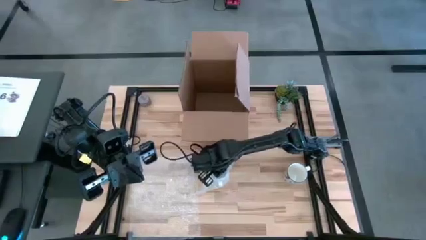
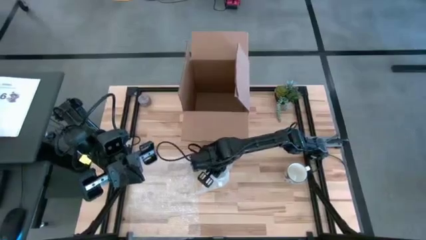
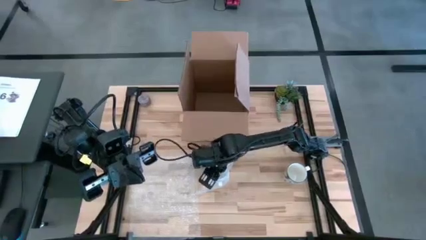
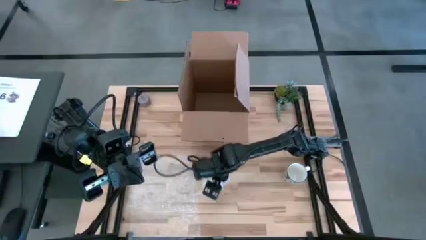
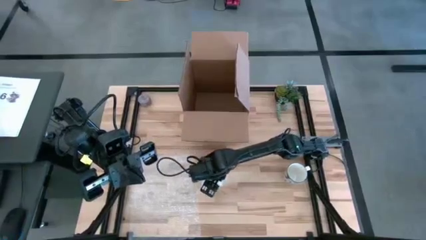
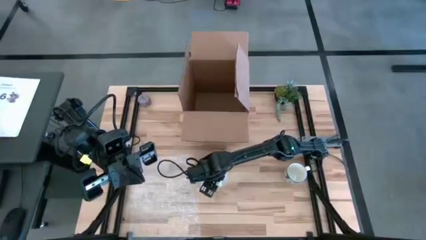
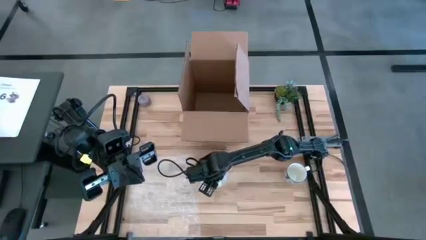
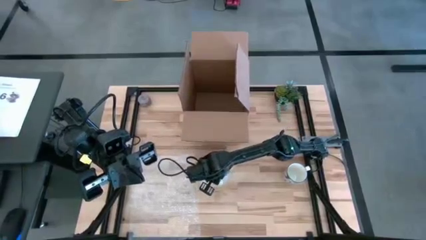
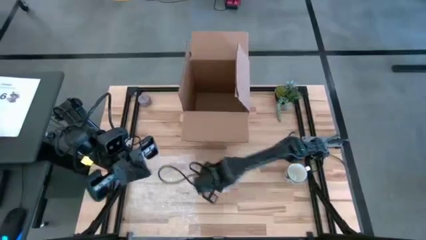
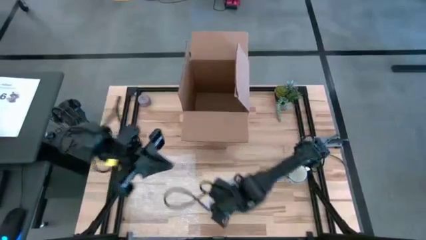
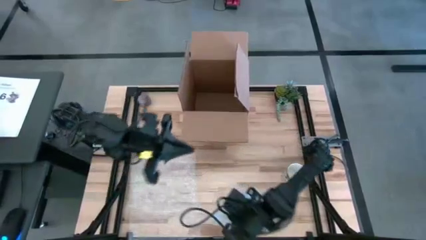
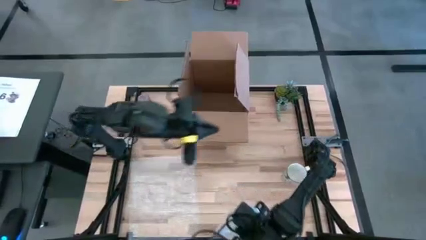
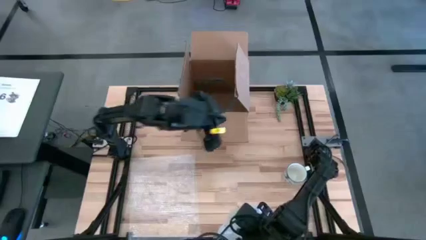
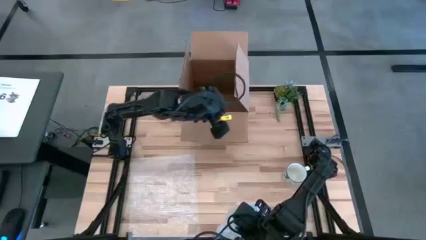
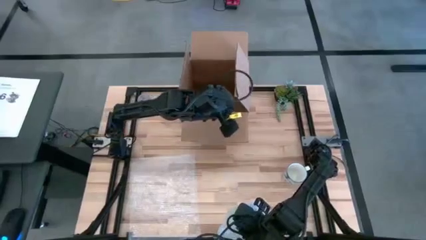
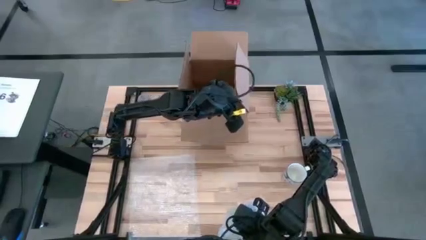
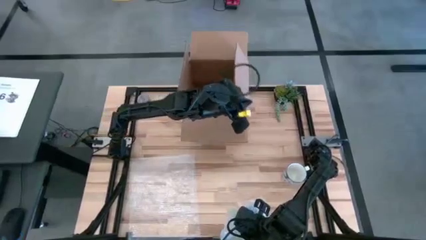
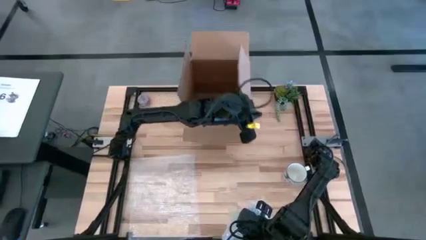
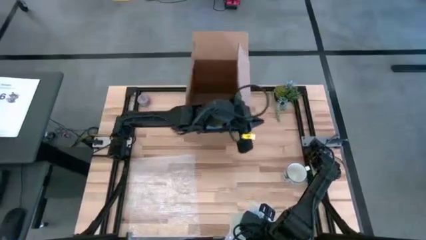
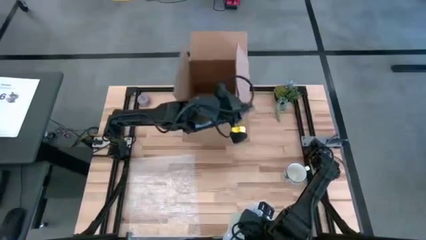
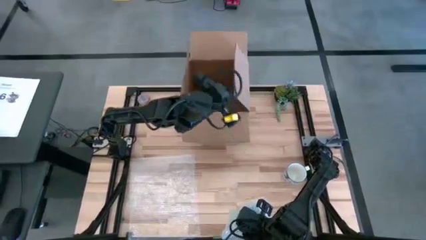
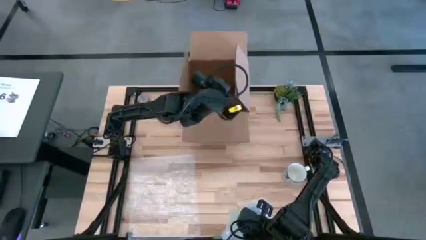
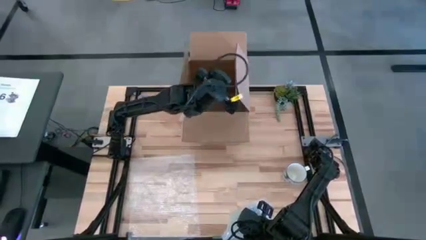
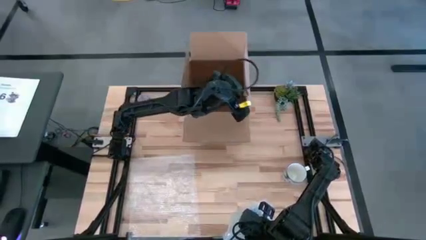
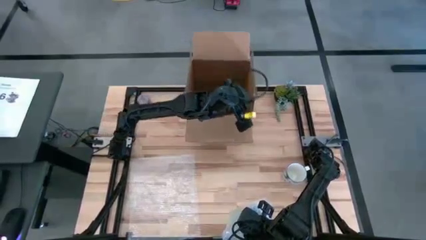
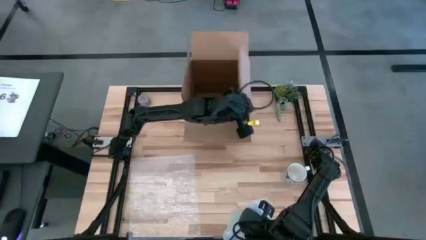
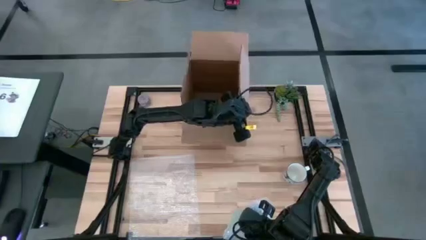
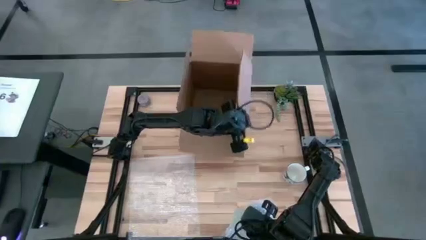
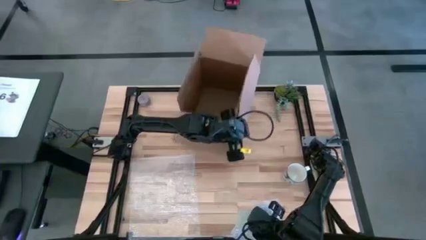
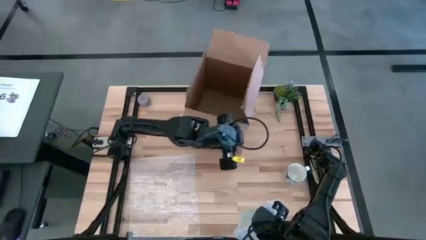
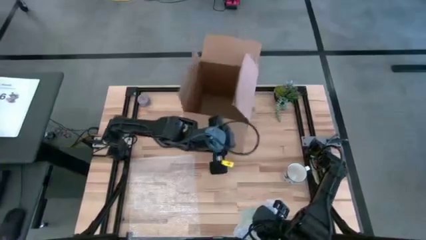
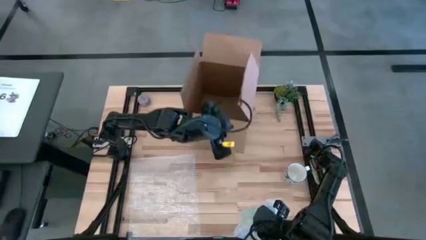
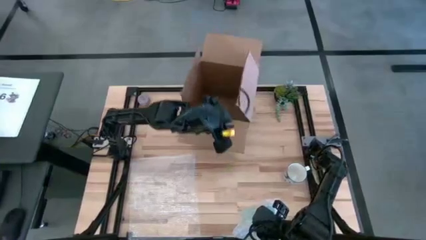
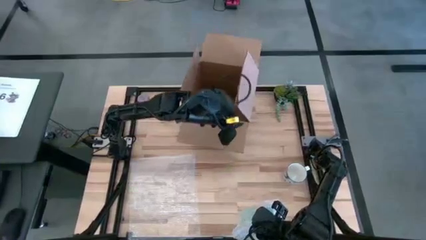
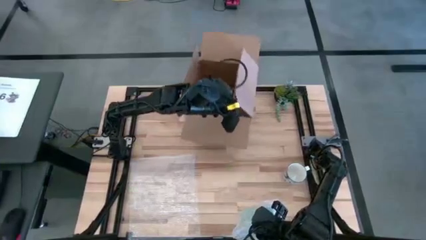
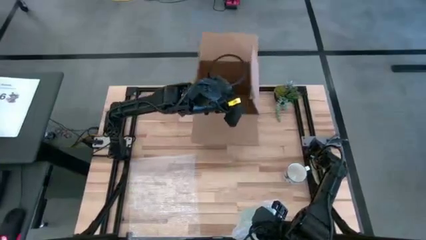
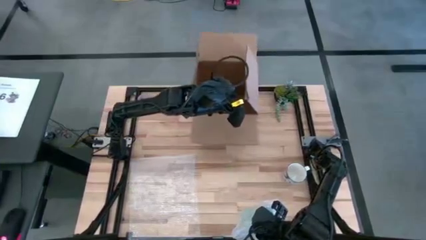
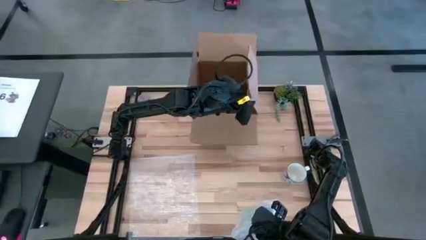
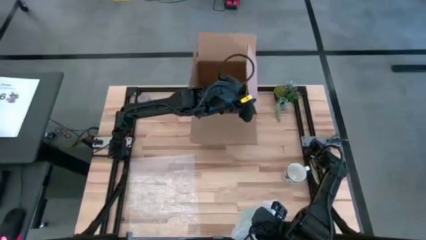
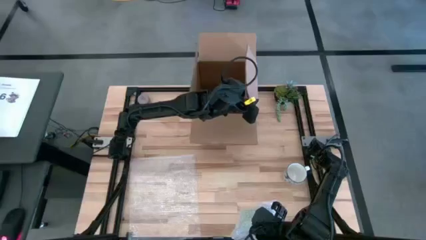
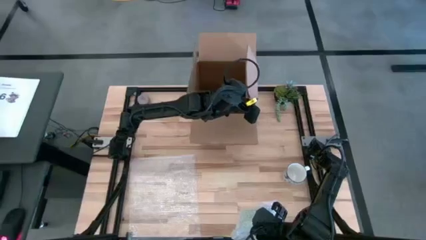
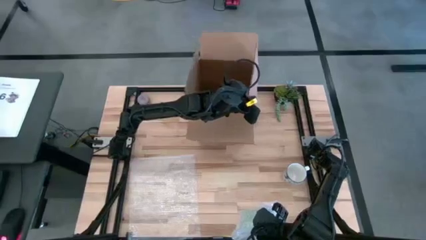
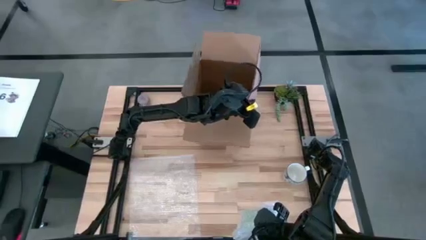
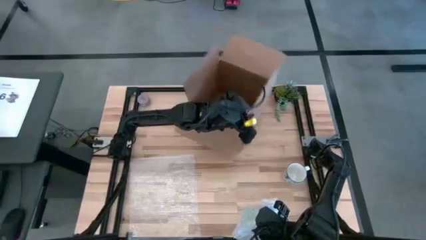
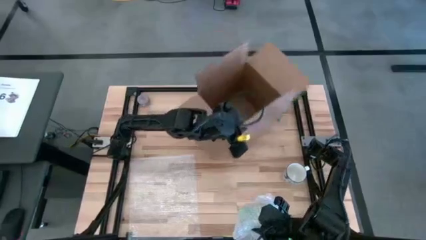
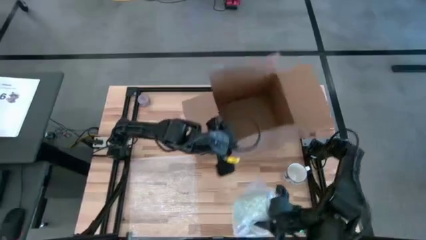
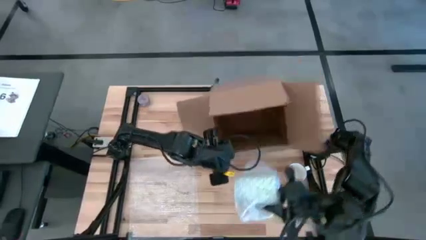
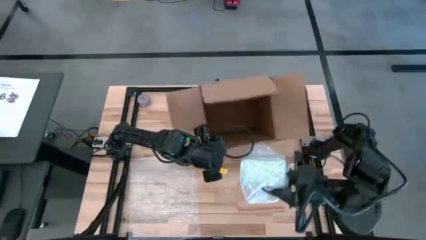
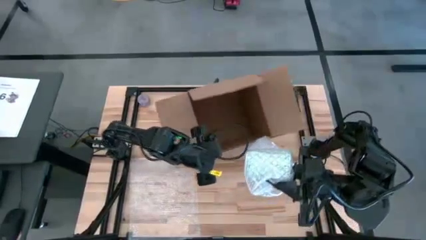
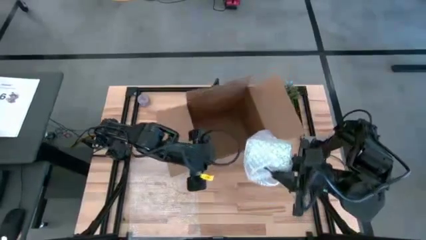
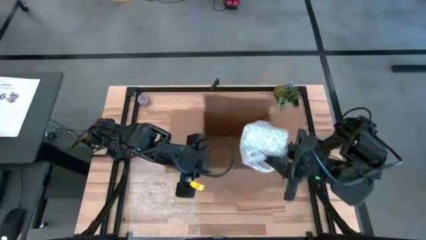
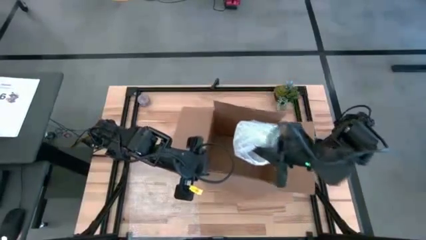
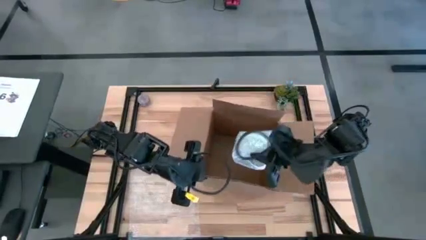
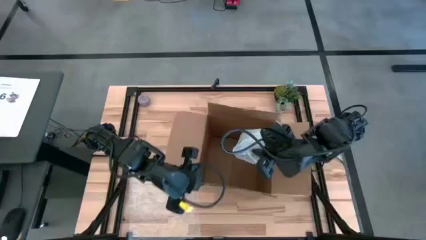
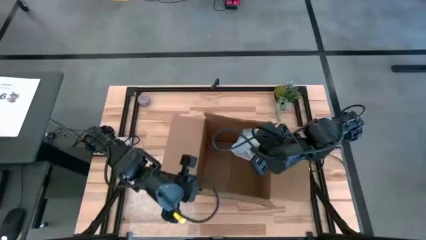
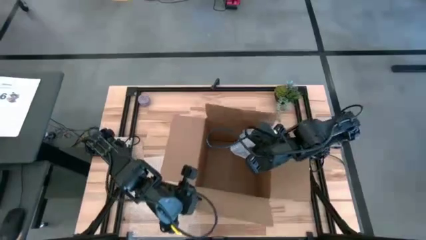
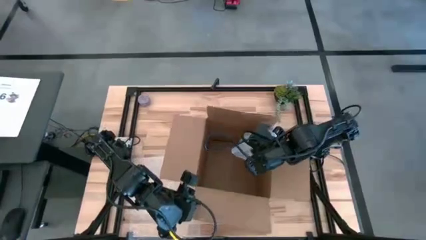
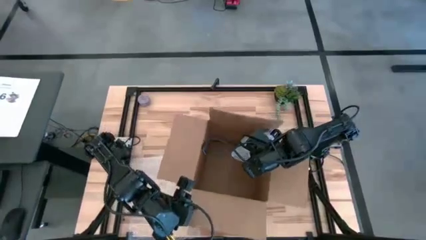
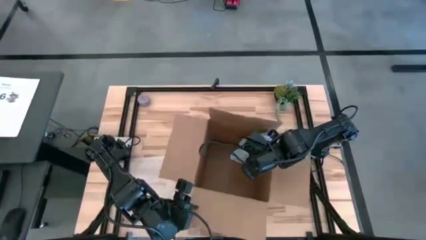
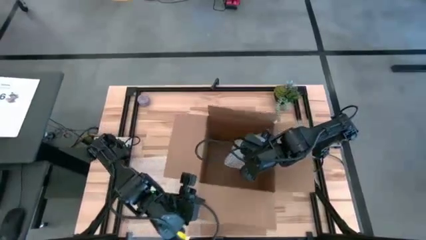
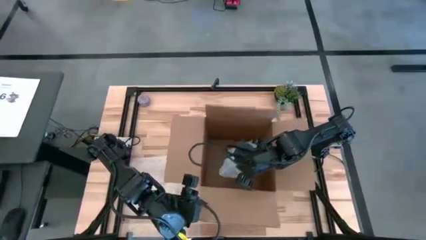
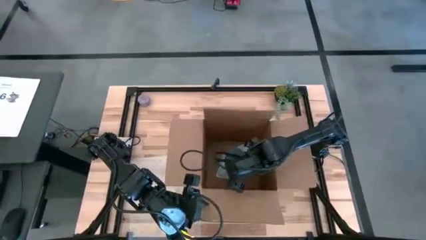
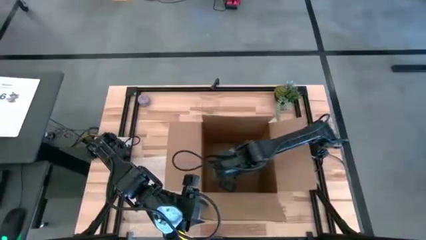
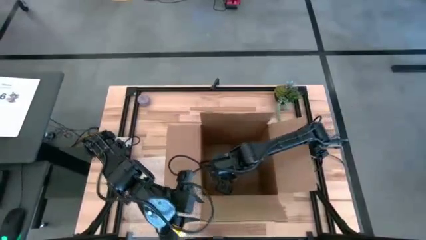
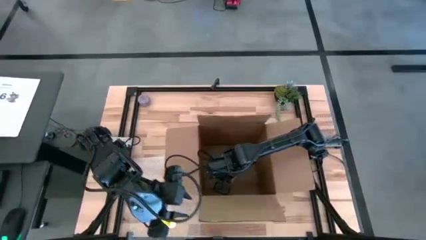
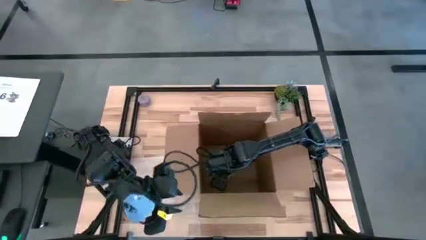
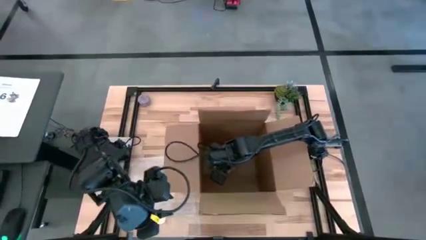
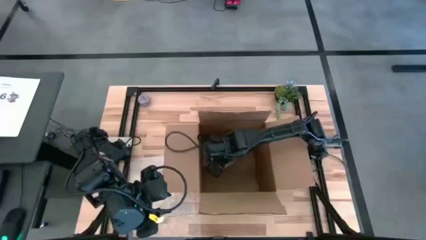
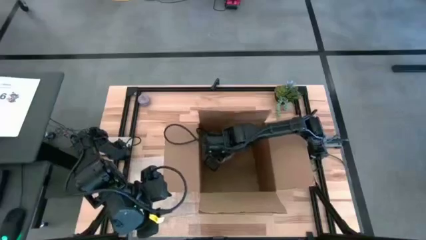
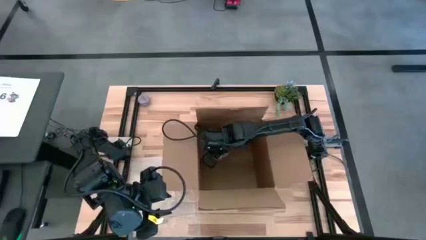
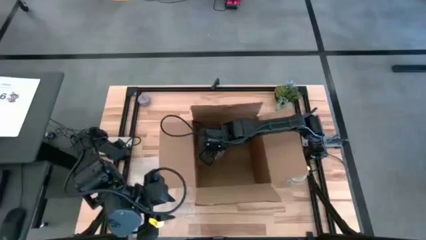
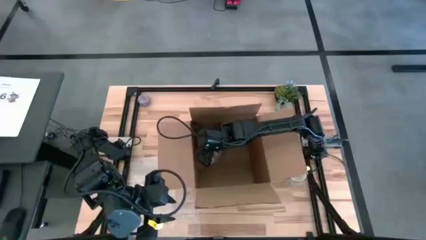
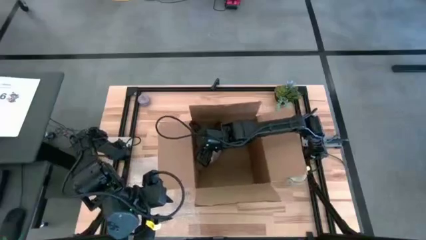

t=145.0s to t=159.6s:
Task: wrap mug
Put the wrapped blue patterned mug into the cardboard box

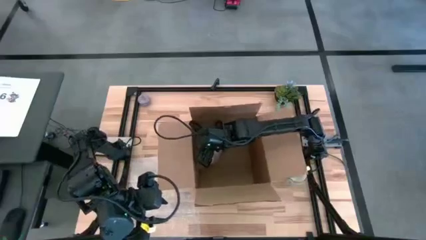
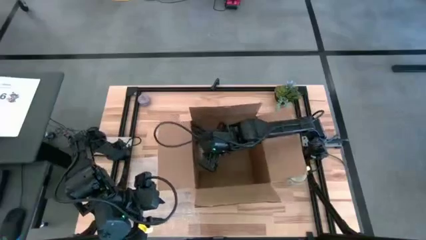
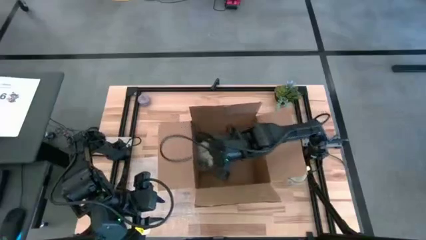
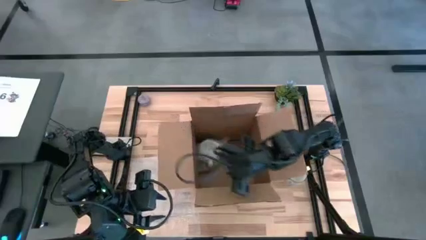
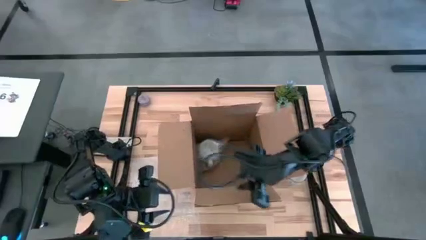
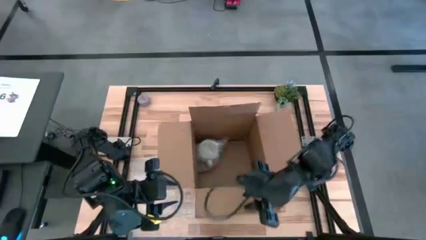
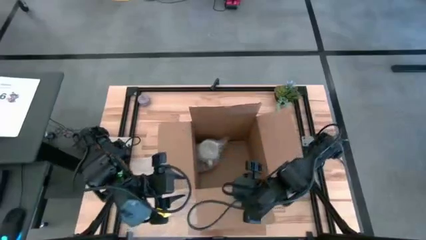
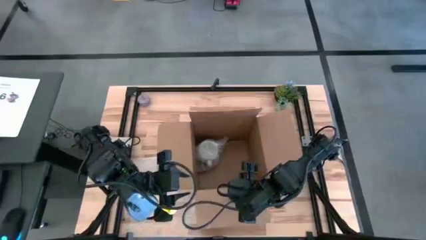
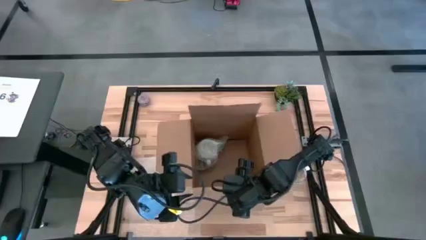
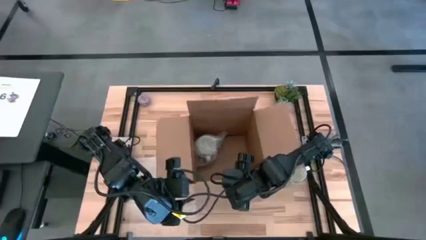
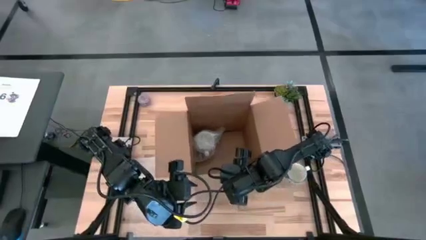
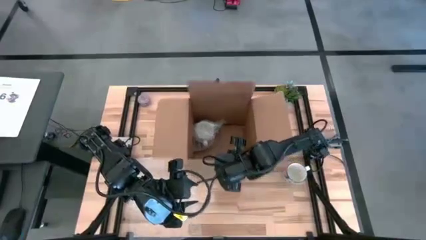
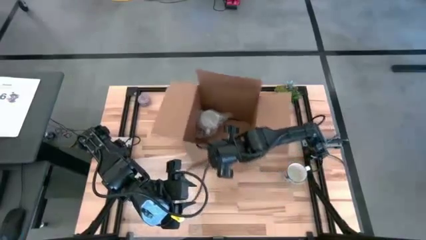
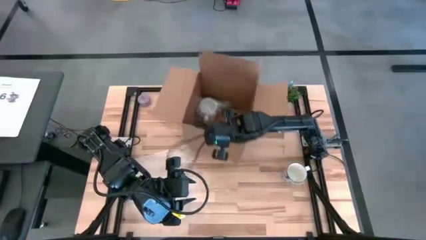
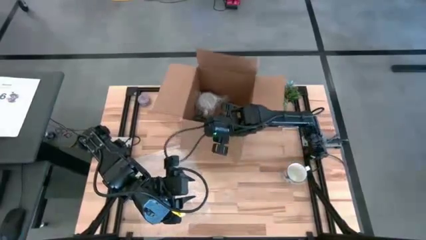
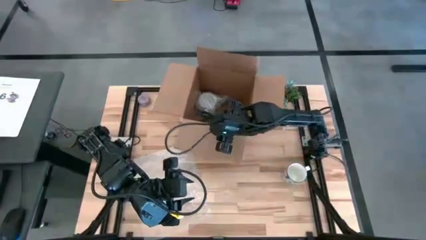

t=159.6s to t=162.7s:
Adjust the cardboard box
